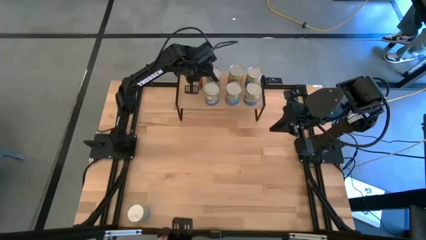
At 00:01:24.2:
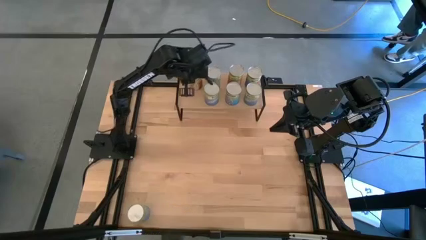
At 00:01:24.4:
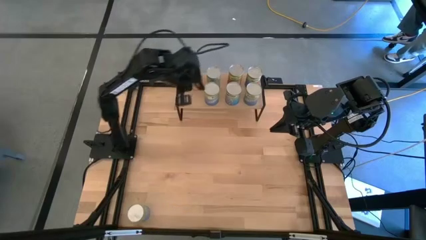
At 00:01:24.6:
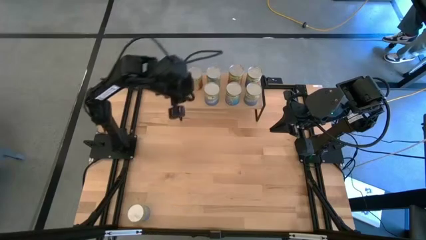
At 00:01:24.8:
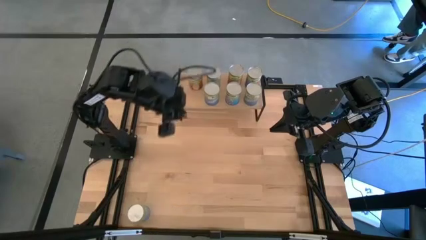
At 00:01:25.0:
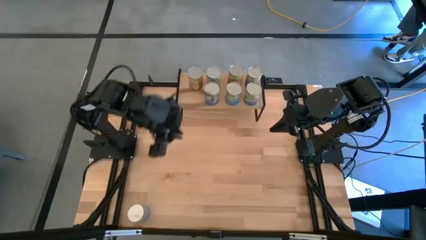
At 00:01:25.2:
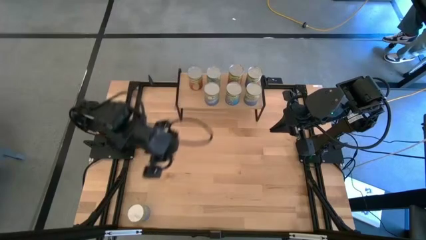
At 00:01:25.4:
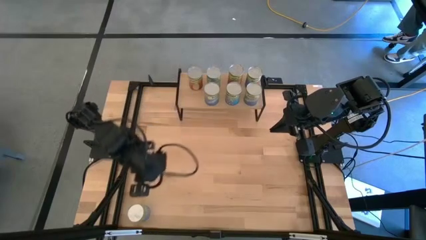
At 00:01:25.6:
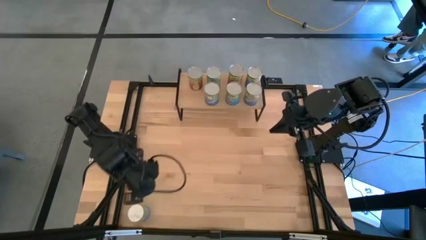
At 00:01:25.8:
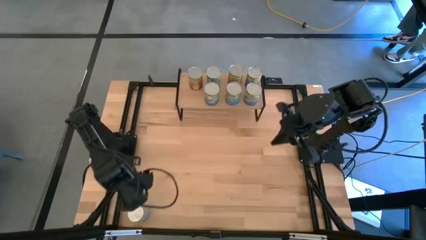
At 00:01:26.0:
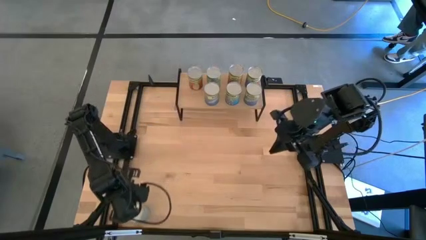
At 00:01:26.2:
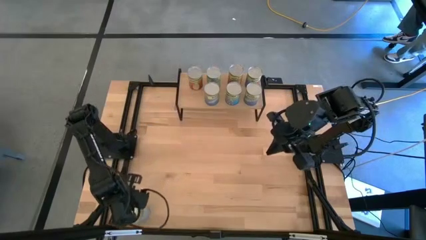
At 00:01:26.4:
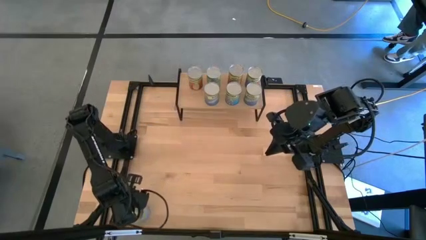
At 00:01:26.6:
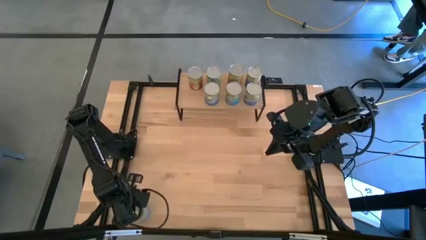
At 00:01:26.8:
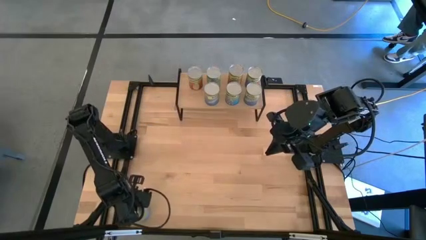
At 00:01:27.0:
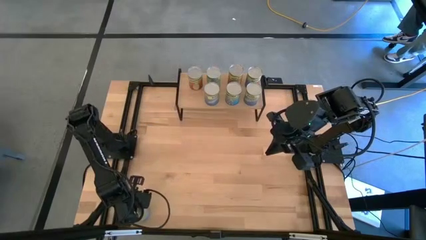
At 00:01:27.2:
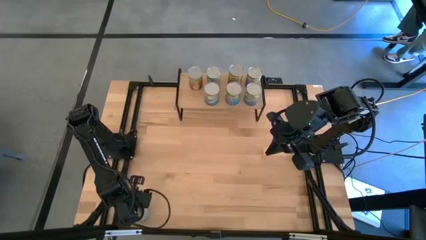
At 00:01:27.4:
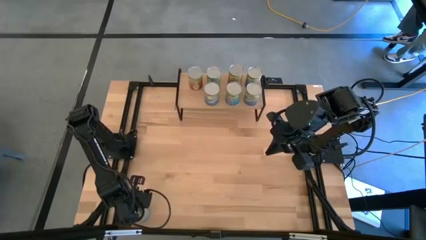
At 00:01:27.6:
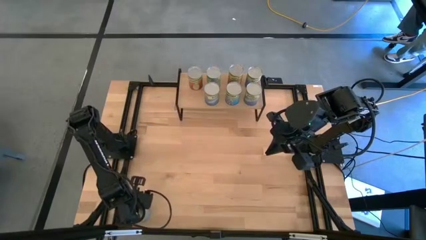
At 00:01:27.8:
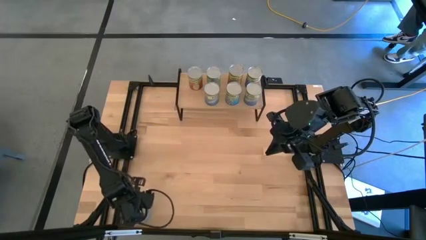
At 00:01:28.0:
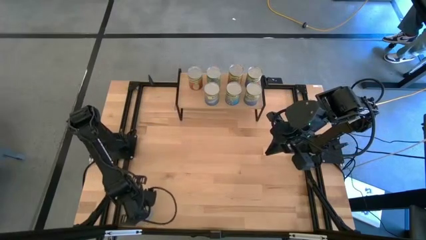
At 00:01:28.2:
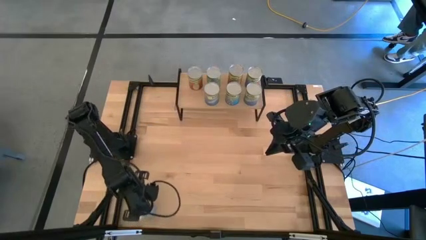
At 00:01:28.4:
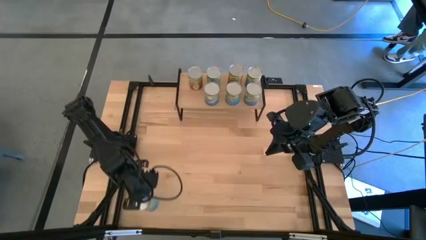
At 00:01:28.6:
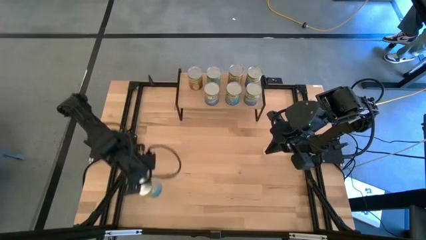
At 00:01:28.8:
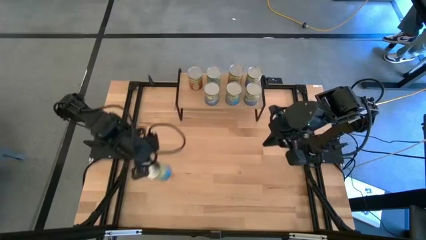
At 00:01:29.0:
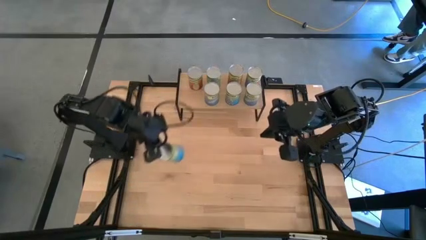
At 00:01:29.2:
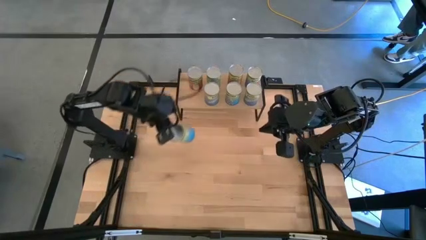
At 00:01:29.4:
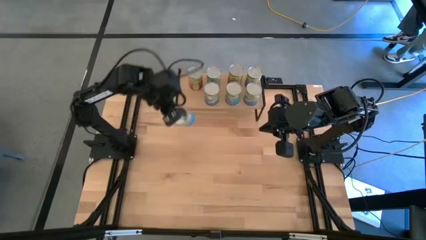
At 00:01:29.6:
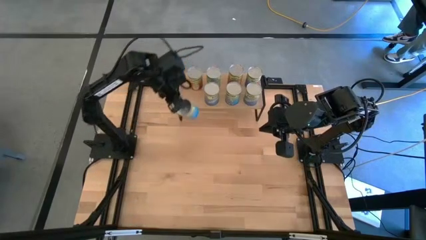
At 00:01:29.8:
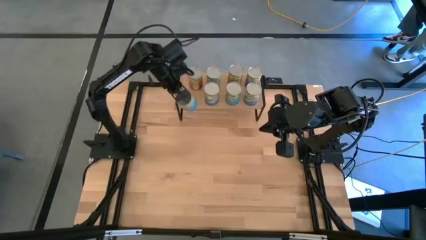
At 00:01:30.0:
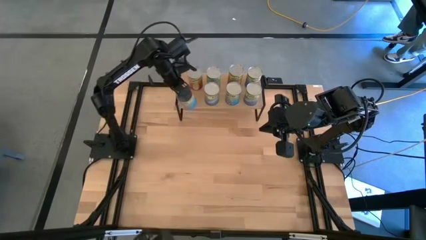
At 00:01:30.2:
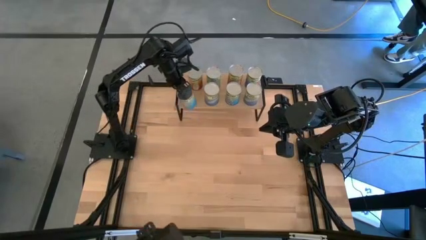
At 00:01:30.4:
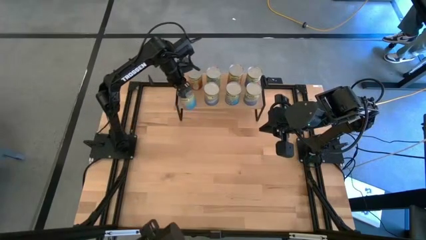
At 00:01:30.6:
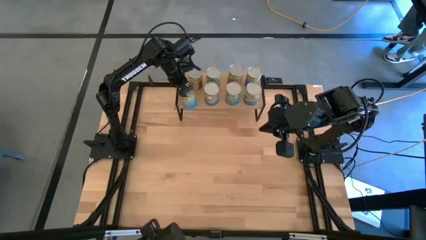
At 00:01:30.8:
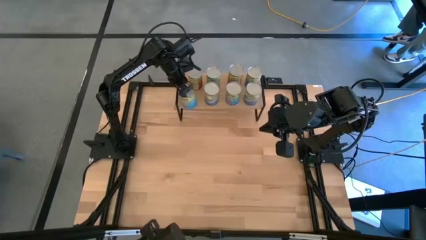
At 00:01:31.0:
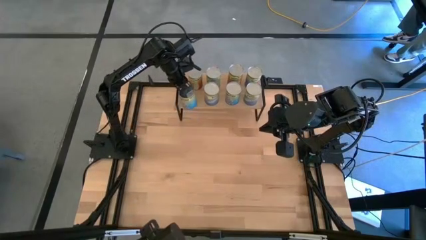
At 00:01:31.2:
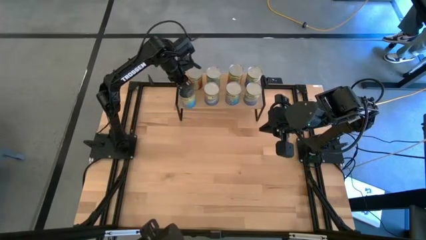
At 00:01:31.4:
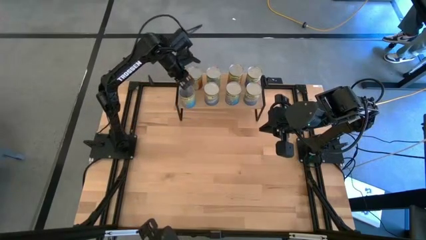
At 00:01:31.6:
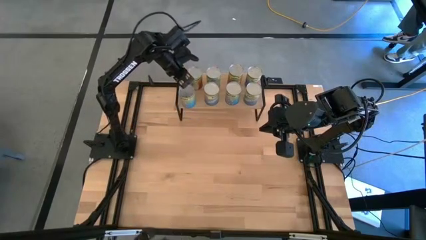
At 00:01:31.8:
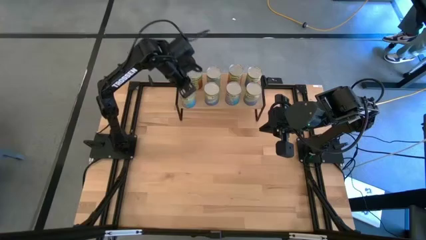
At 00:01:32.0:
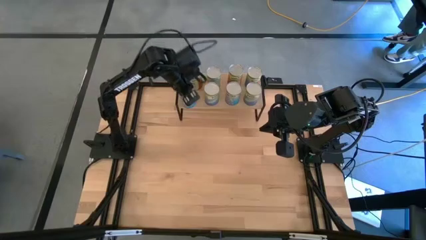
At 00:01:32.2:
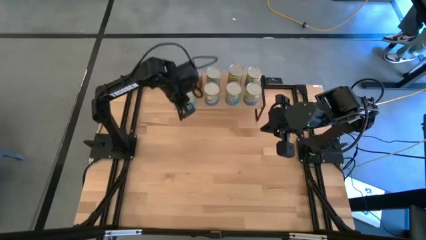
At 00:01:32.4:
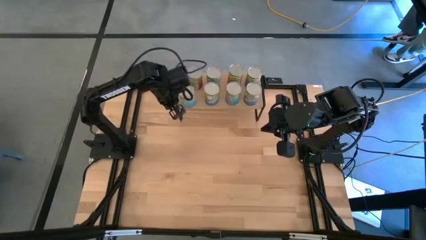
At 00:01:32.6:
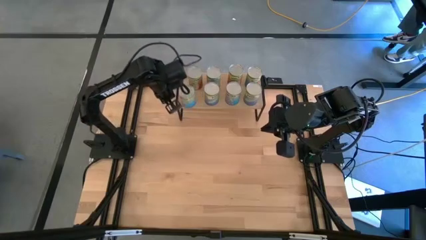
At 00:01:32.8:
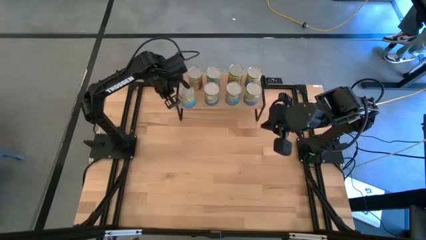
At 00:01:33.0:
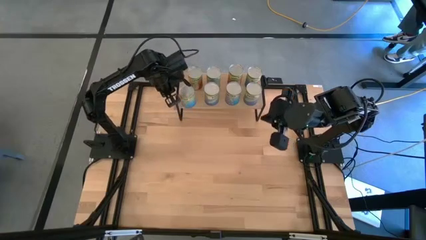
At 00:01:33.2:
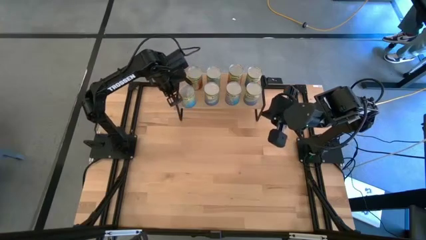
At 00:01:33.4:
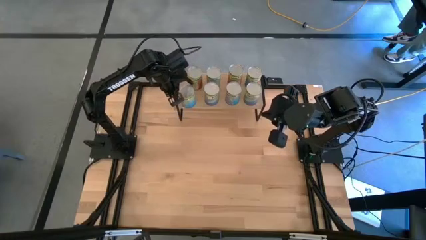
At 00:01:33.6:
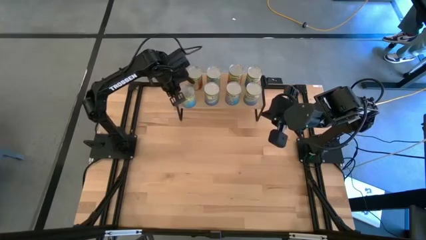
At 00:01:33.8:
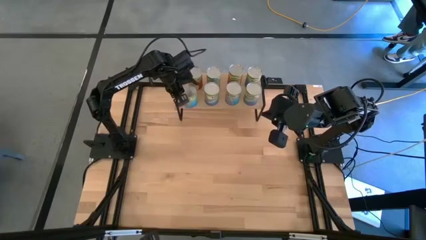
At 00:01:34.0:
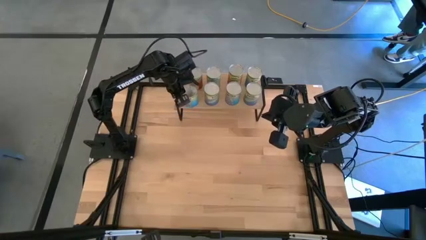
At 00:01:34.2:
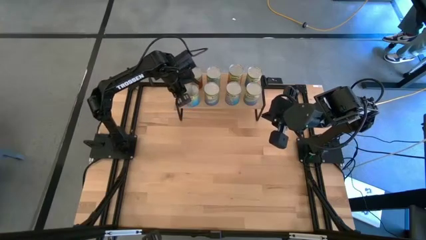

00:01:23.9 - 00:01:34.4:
Task: Pick and place cans onto a shelf
Put the canned cherries on the shelf

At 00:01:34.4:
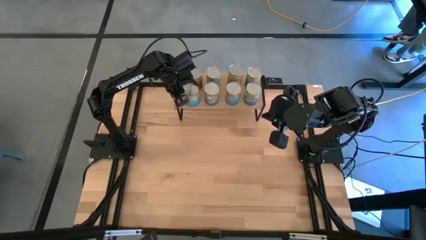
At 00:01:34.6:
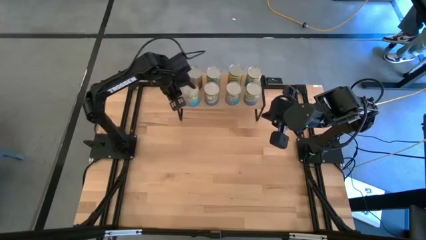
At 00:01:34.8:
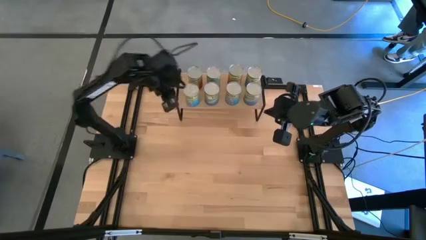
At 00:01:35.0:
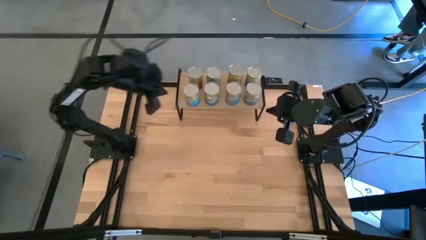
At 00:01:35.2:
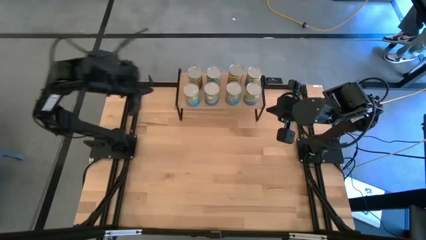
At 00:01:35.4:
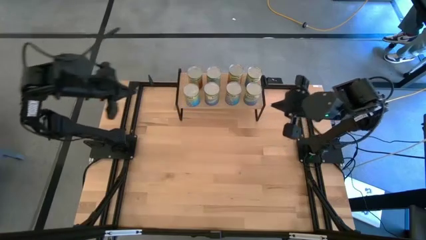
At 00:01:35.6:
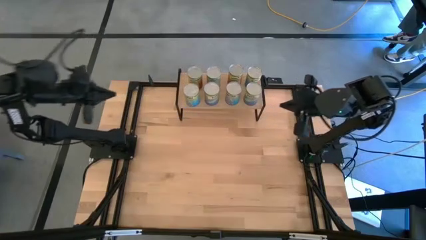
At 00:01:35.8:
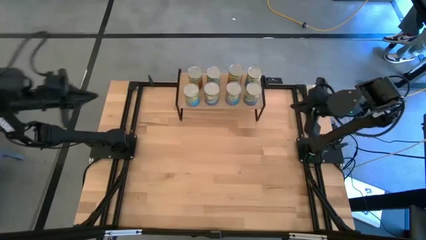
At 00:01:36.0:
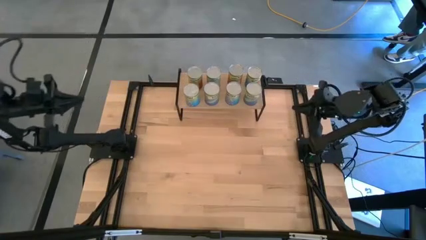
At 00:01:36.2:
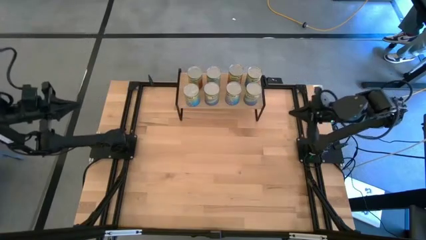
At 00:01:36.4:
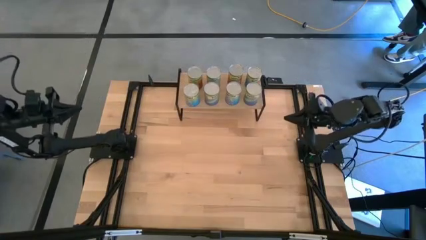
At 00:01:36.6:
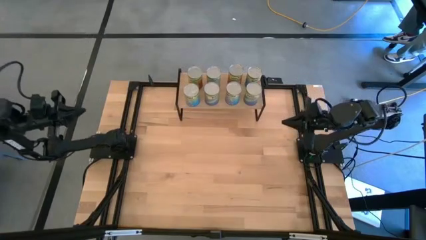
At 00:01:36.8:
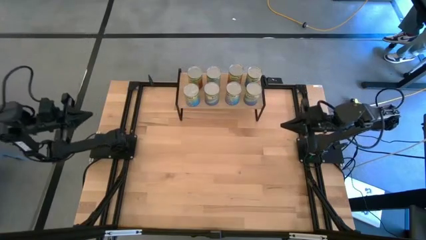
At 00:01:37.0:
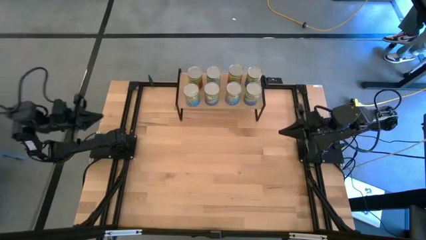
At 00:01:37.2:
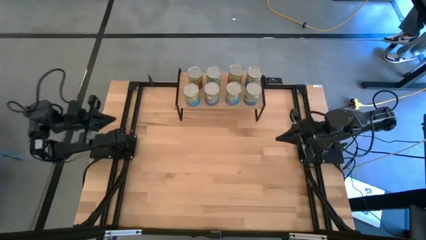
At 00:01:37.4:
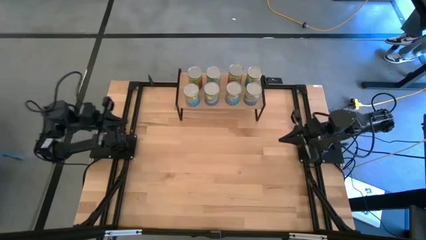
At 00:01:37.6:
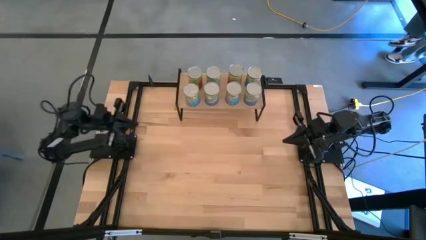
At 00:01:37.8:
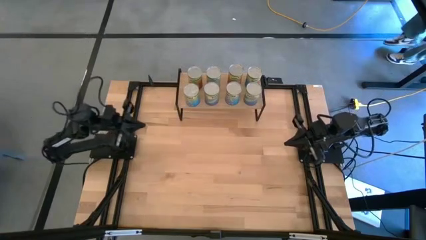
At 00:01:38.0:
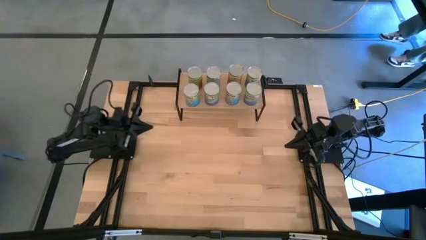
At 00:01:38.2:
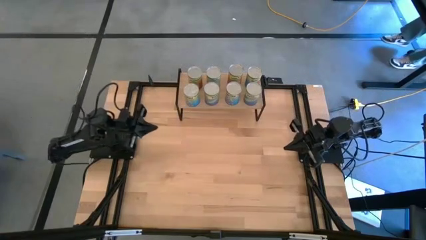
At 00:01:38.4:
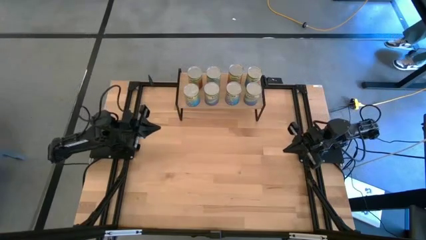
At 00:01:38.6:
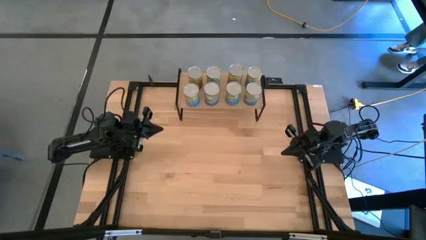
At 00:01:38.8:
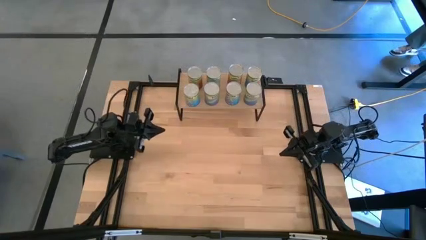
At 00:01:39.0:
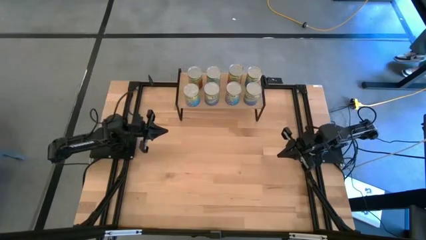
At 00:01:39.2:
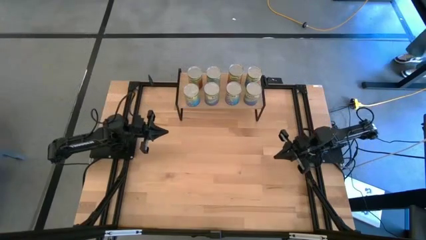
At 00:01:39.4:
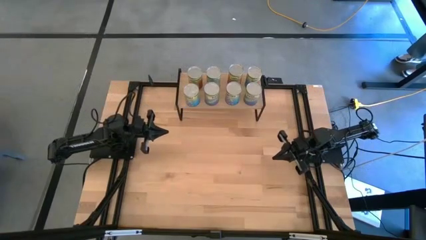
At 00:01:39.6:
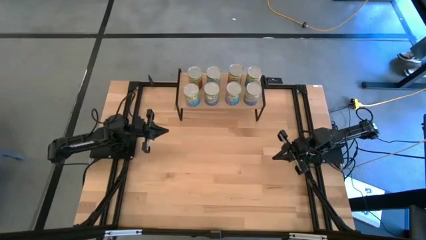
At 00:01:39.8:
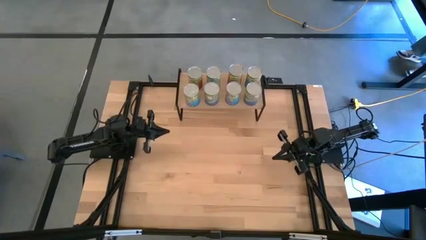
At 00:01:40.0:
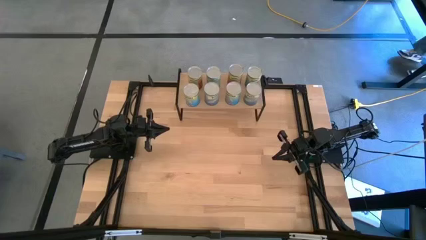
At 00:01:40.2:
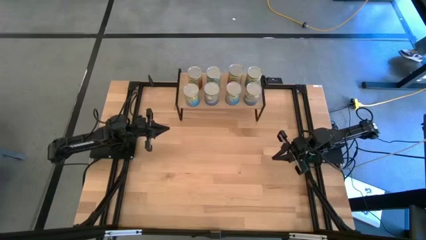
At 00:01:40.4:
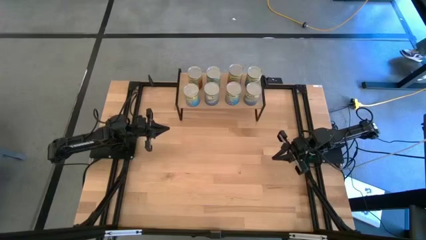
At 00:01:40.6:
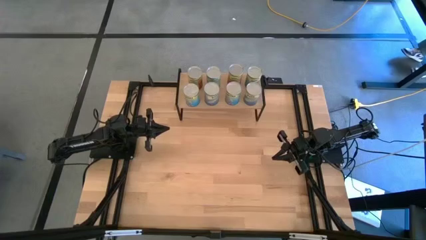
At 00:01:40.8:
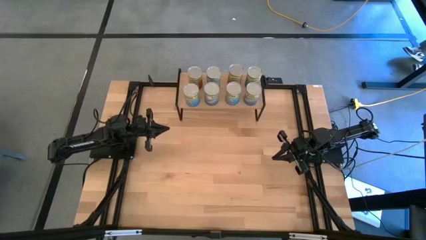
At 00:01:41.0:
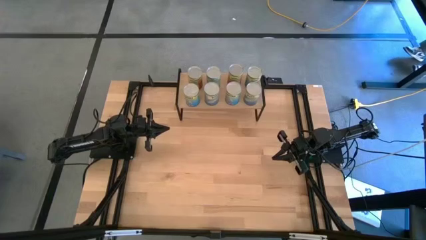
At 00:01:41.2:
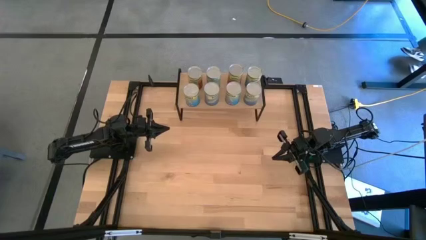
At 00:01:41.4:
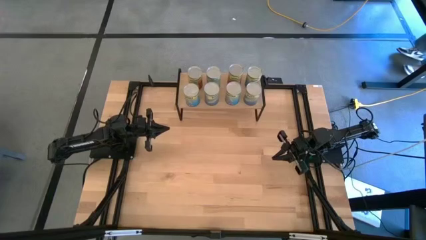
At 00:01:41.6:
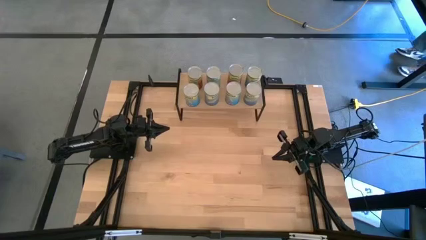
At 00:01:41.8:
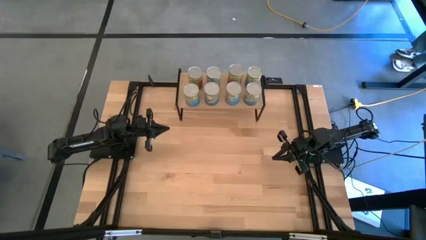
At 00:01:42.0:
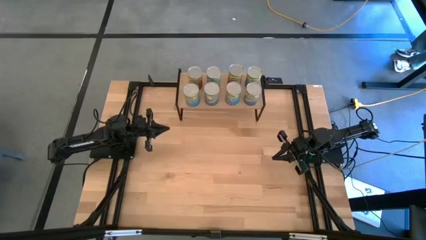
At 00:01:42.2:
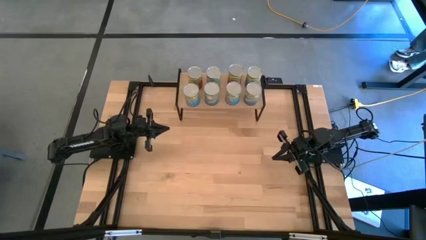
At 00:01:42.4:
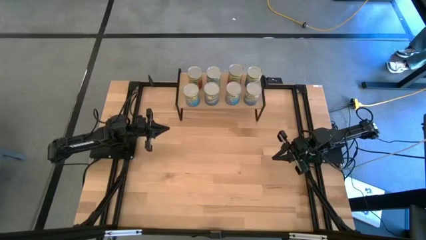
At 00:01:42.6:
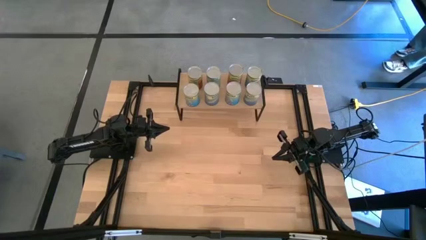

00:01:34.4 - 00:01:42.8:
Return to Home Position
